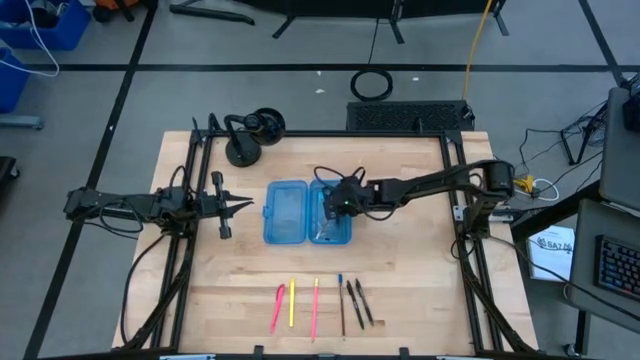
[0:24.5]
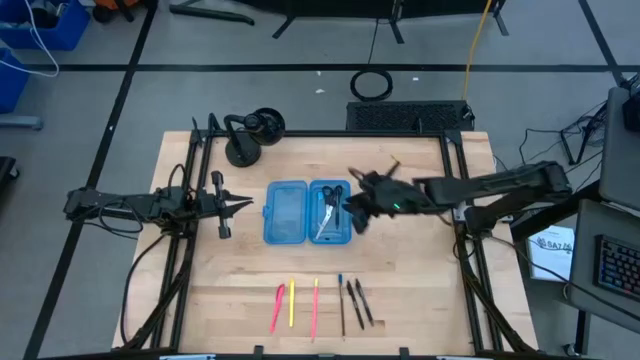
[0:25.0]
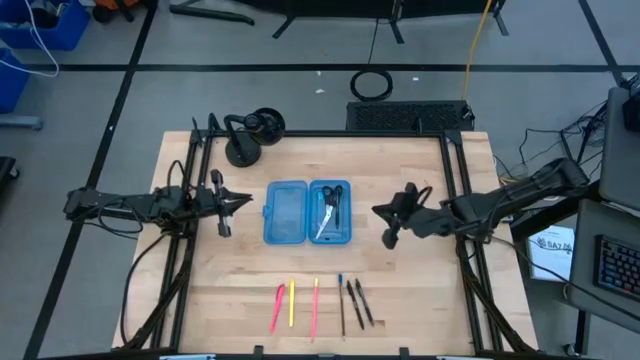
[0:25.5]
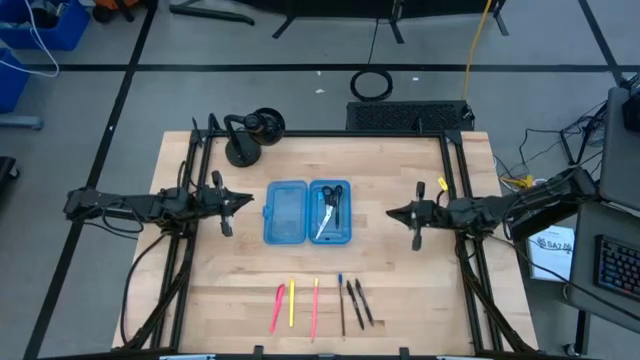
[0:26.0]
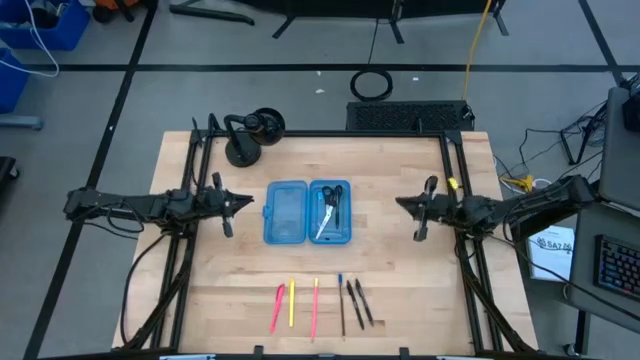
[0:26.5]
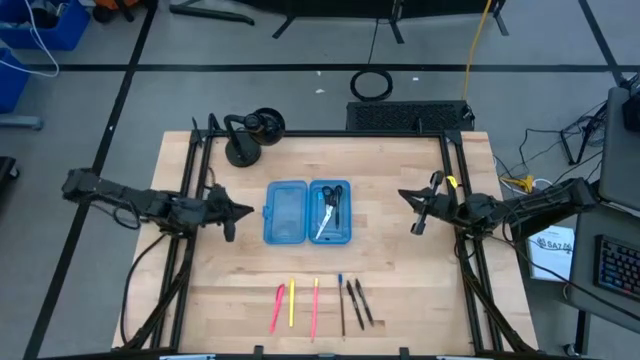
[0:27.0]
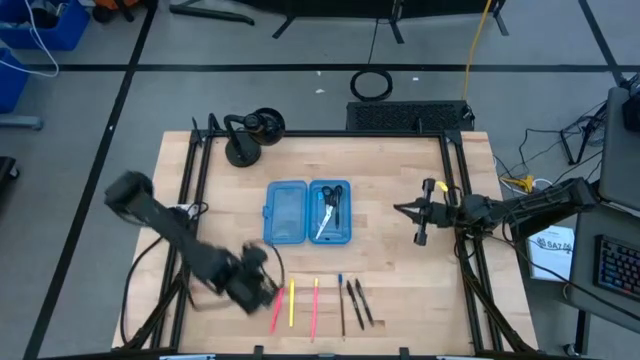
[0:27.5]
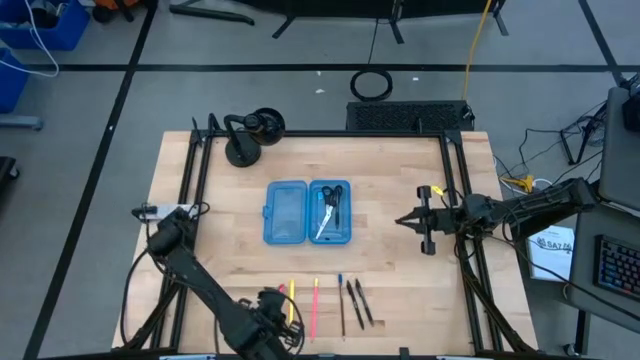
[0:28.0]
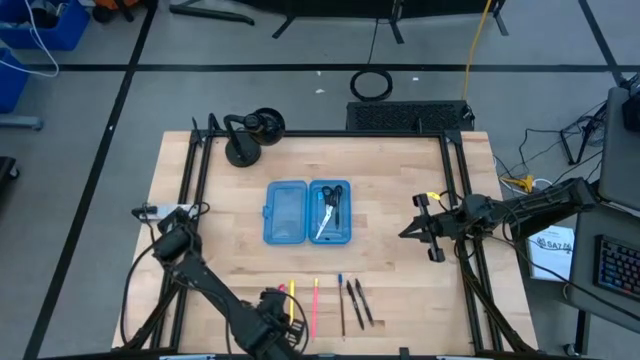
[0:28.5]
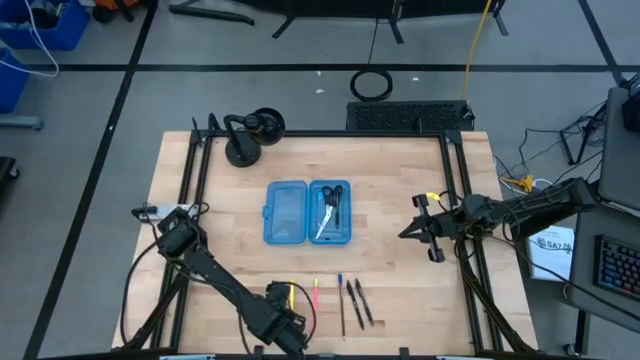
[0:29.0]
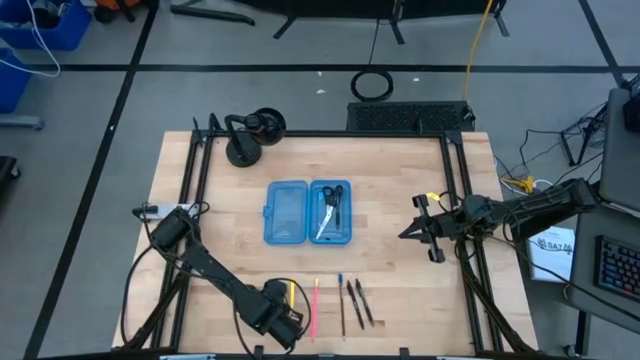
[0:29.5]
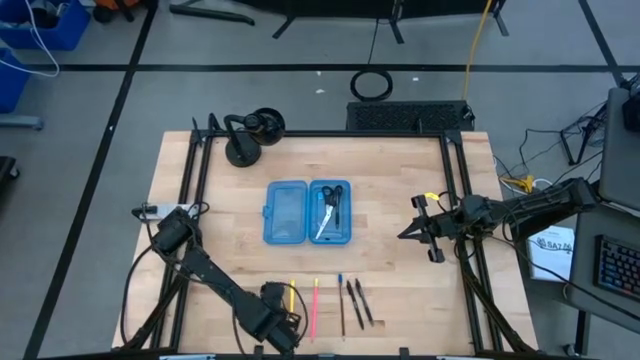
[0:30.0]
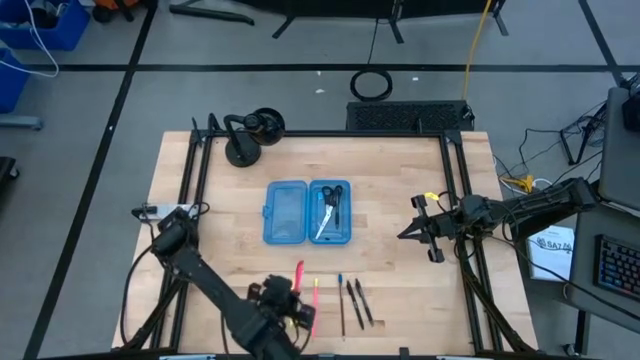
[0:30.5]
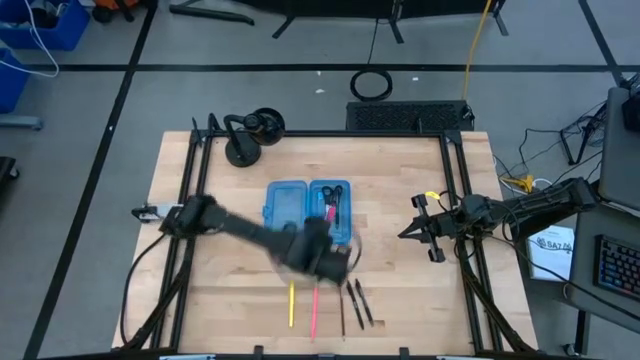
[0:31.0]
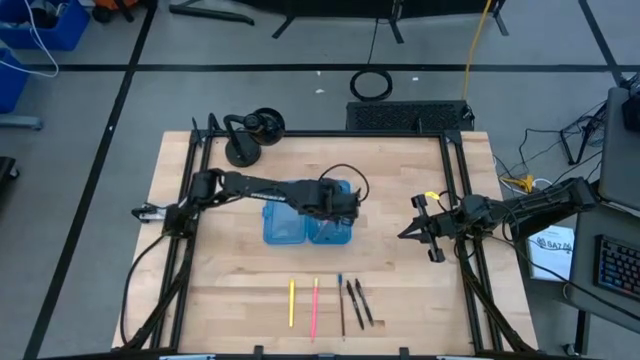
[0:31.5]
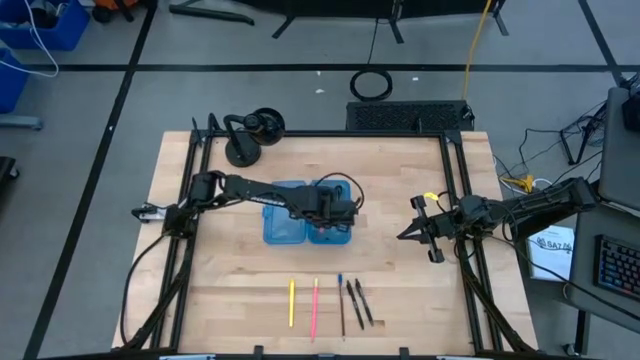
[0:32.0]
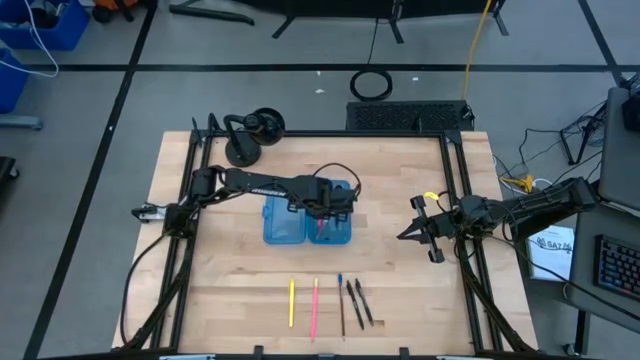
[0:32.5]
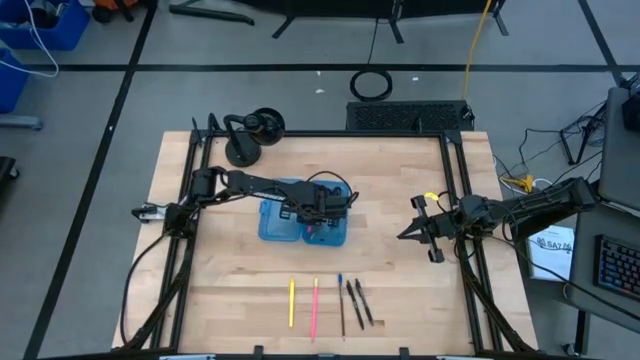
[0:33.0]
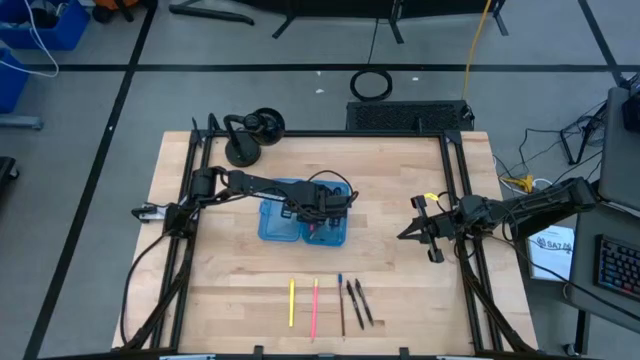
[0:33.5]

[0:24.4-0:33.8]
Task: Pick & place school supplies into a supply box
Put the pink pen into the blue supply box

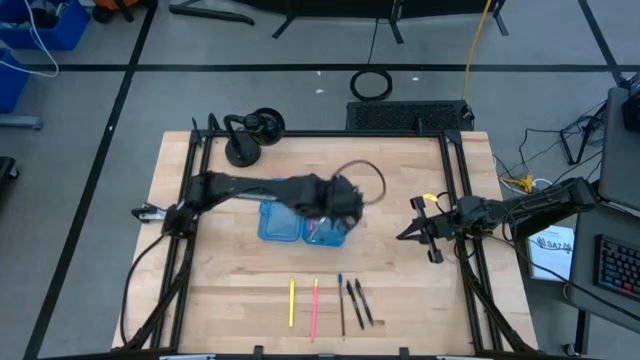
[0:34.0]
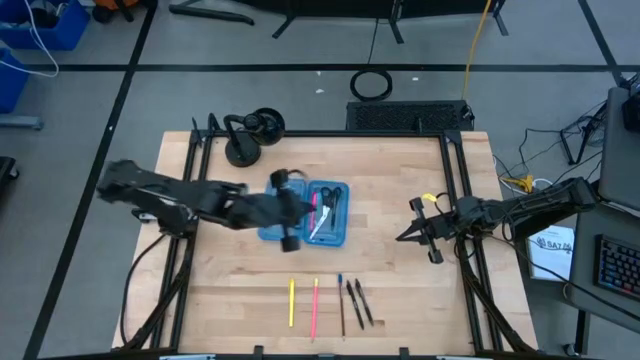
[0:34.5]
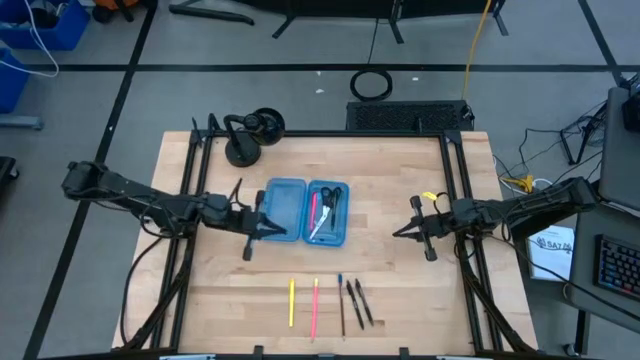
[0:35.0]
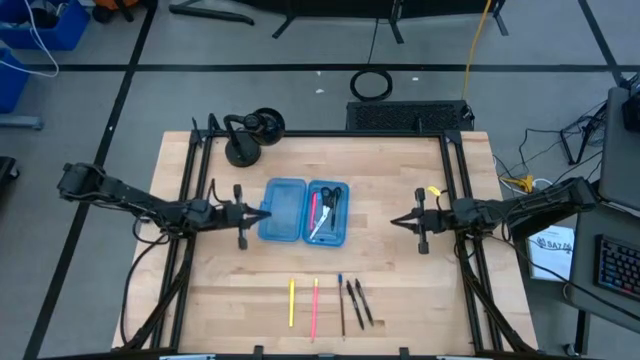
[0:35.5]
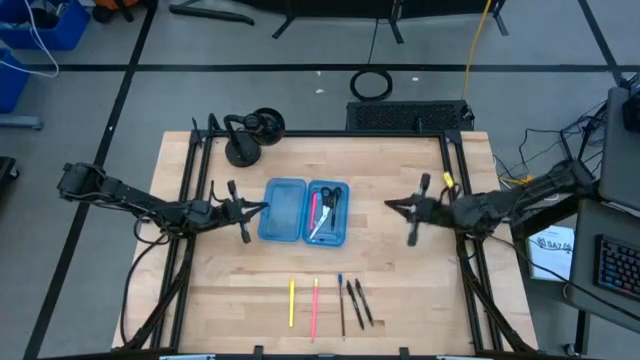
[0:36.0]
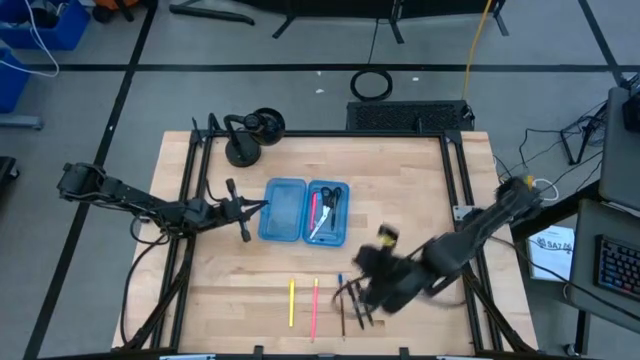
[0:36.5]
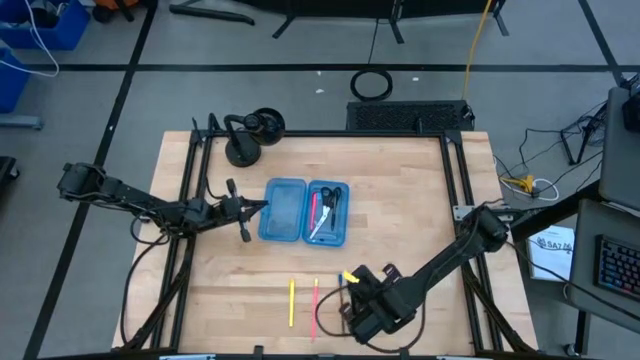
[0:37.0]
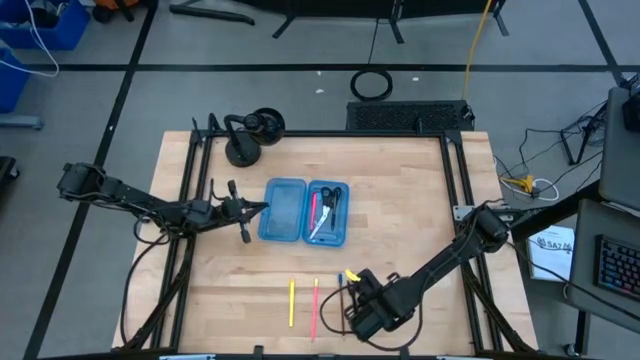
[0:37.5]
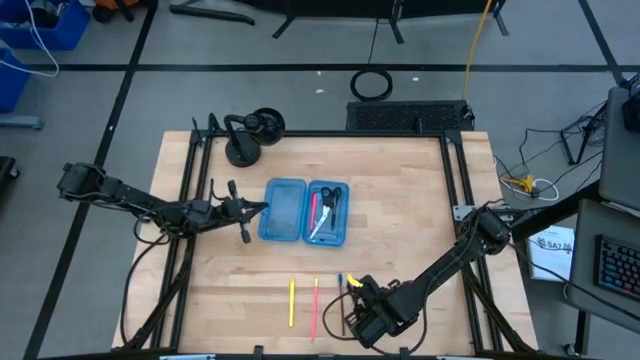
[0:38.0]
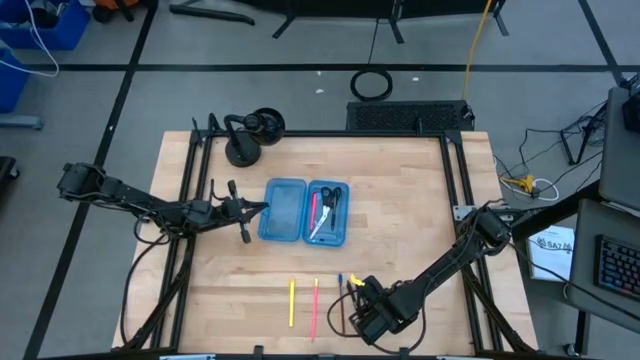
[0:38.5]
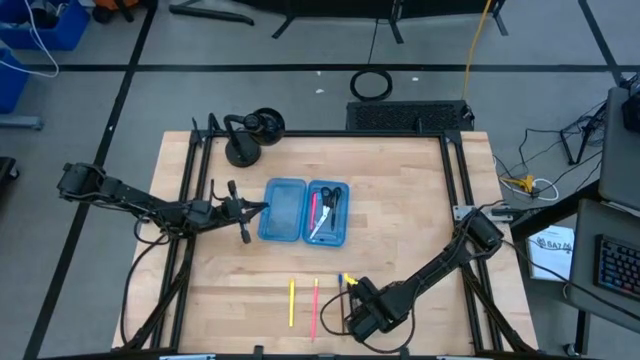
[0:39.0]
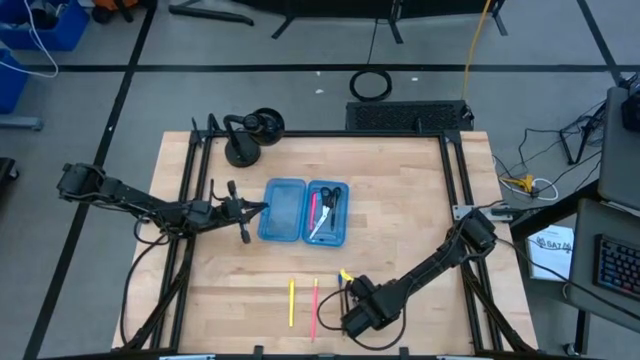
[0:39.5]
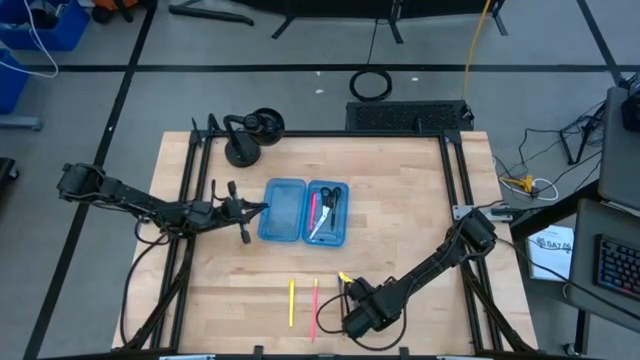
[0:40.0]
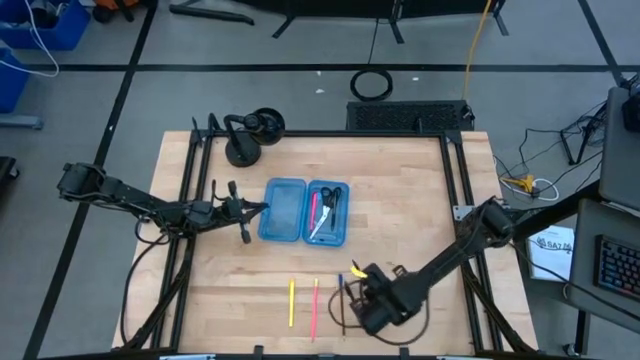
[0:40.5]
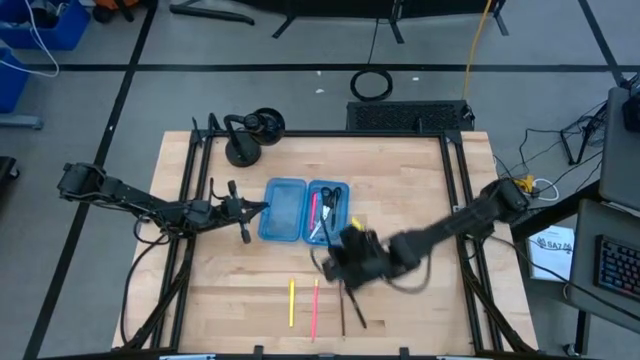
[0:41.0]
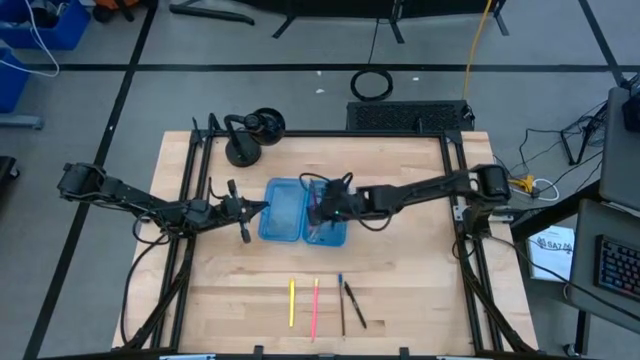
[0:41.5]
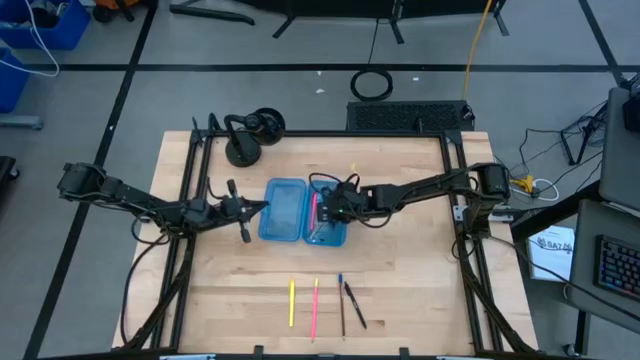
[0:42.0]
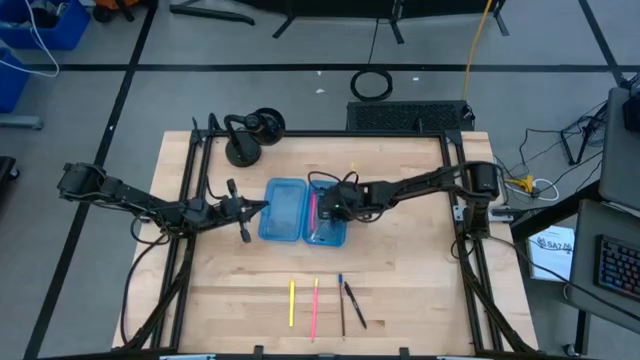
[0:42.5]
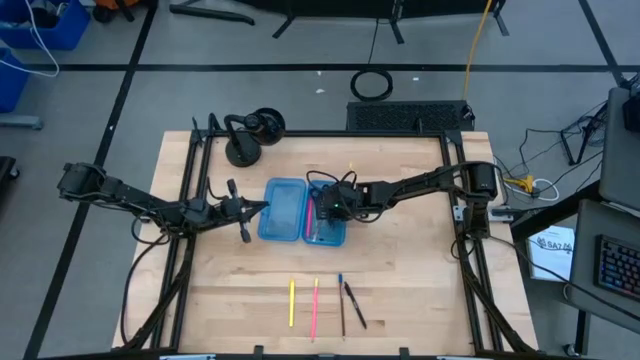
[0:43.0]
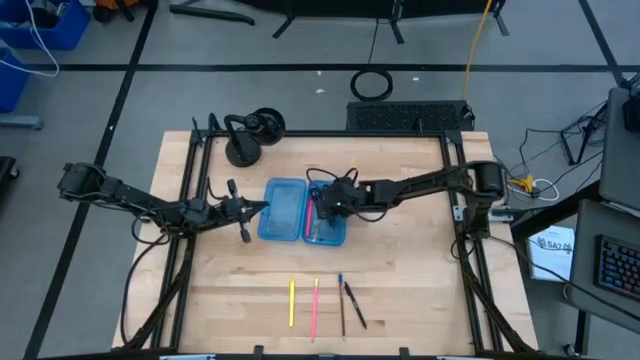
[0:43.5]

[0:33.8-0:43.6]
Put the black transparent pen into the blue supply box

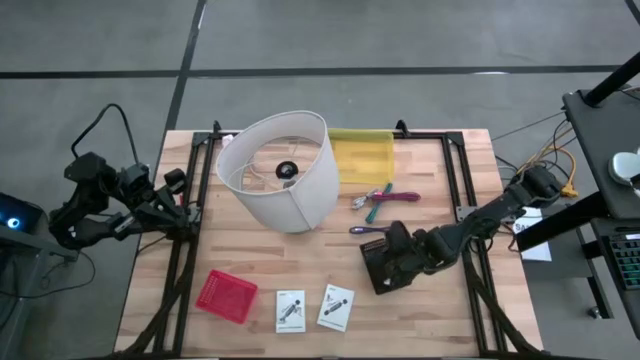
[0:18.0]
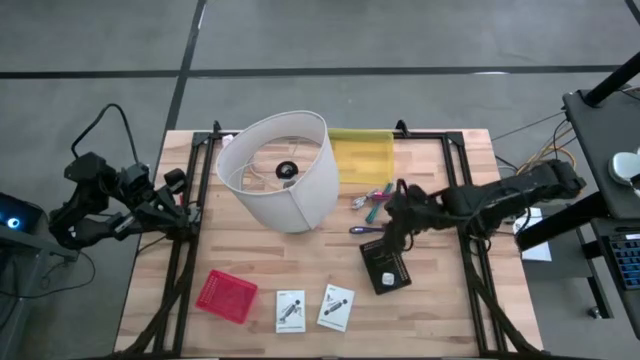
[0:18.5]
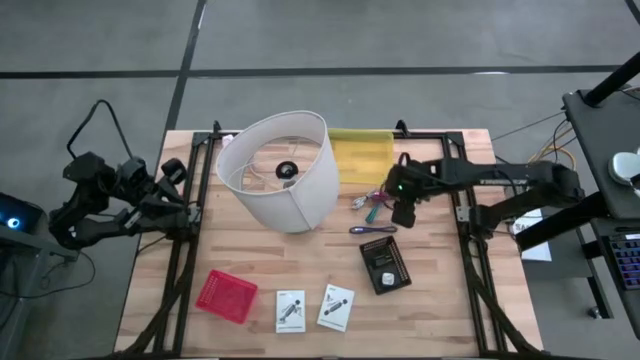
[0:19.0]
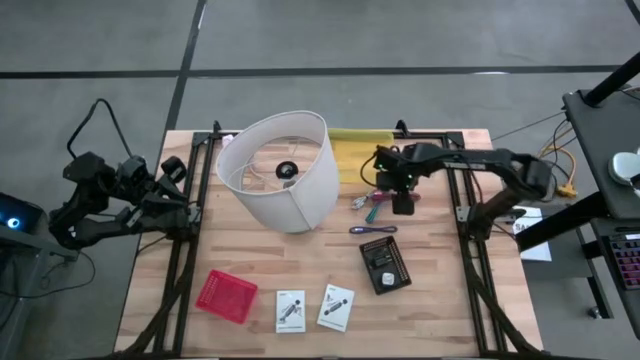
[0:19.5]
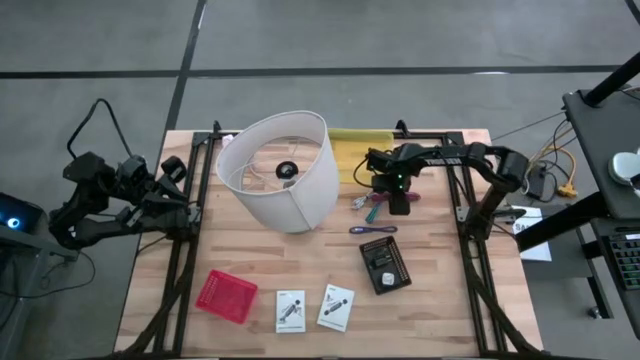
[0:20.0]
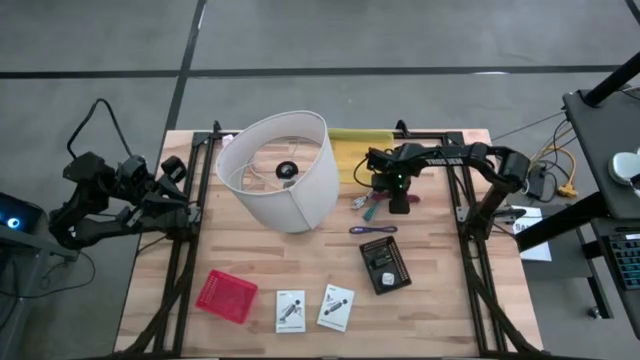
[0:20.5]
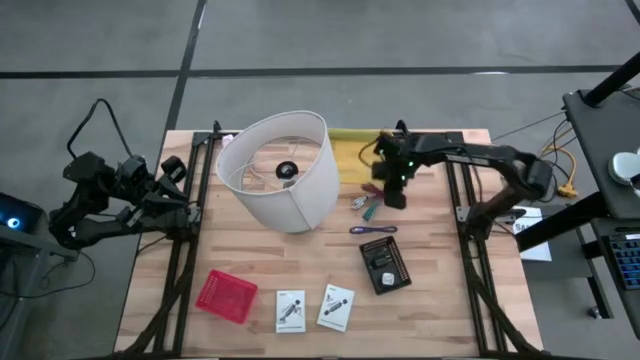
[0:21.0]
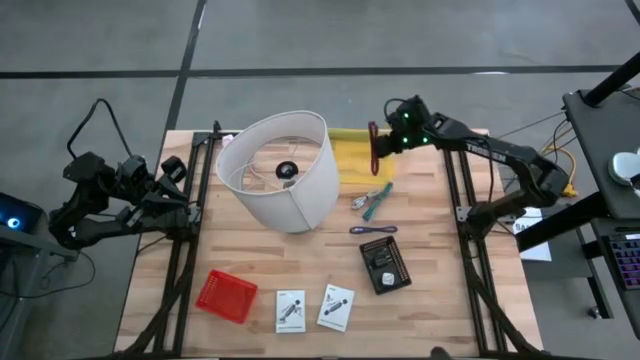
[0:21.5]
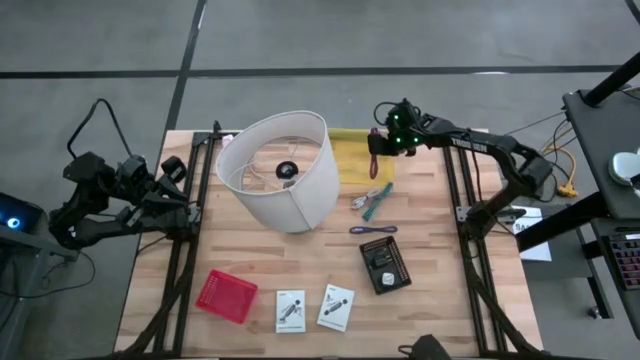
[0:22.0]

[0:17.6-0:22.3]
Task: Pick and place items into bin
Put the red cable into the yellow bin
